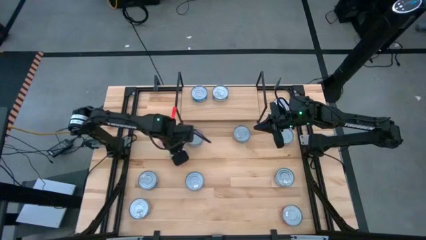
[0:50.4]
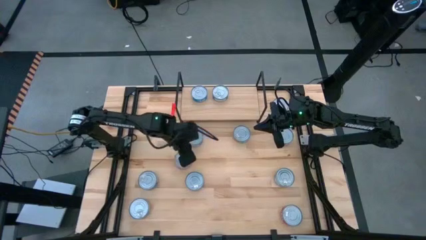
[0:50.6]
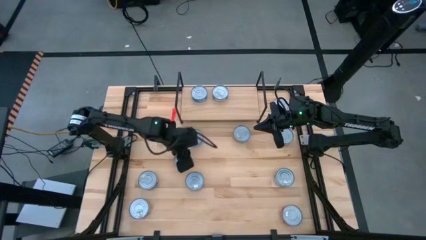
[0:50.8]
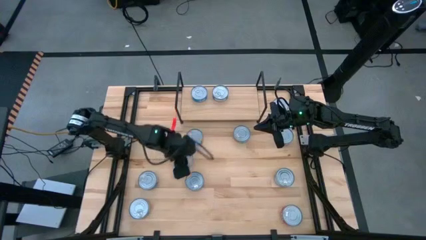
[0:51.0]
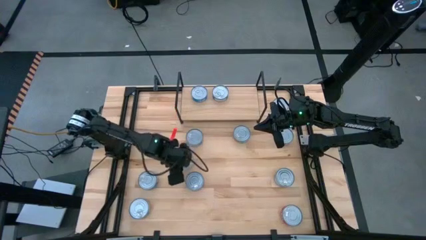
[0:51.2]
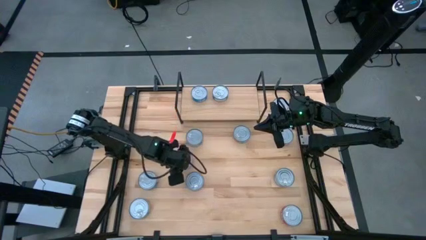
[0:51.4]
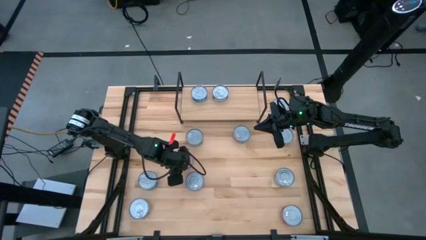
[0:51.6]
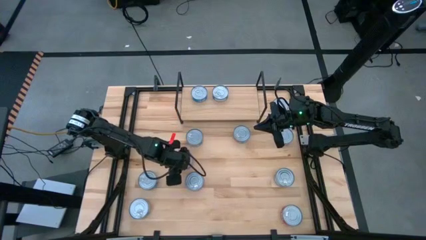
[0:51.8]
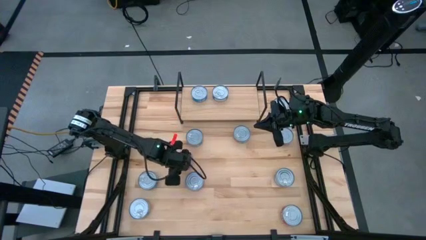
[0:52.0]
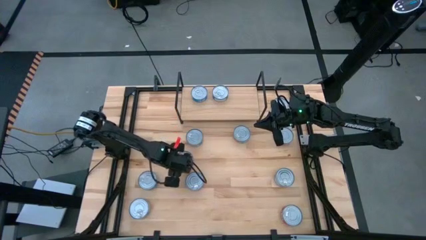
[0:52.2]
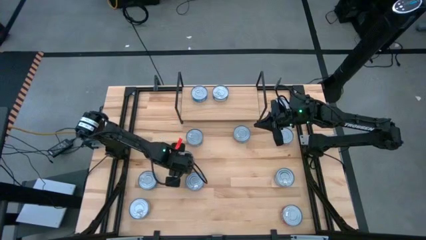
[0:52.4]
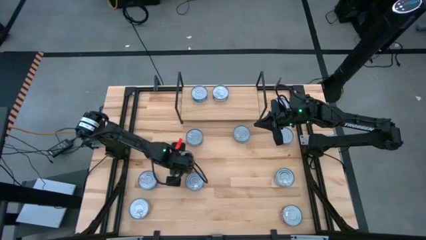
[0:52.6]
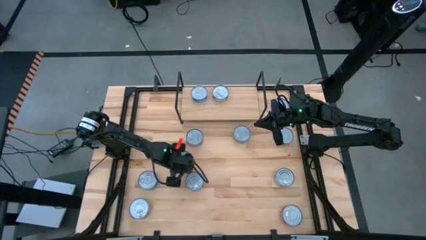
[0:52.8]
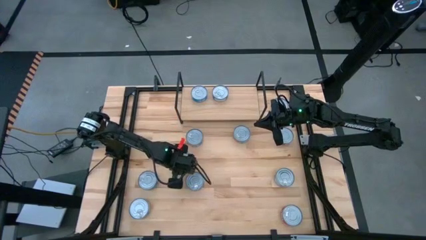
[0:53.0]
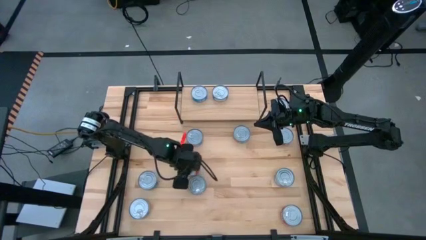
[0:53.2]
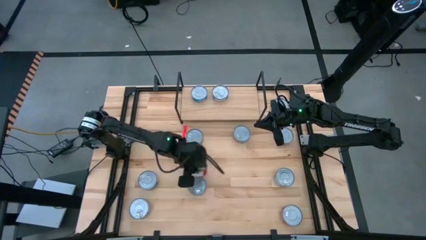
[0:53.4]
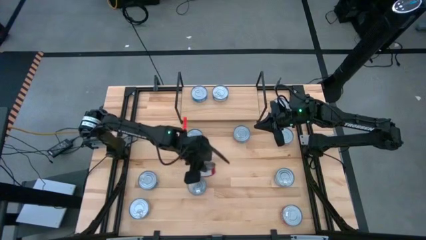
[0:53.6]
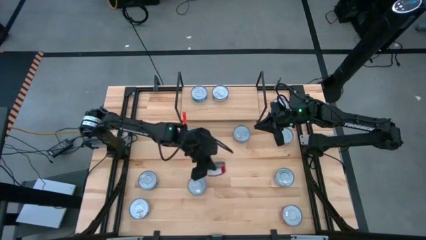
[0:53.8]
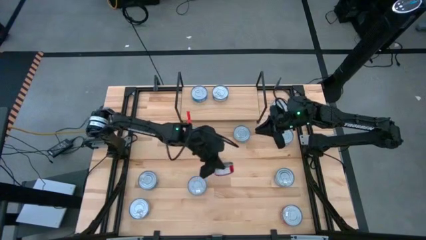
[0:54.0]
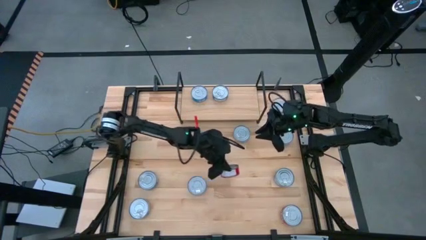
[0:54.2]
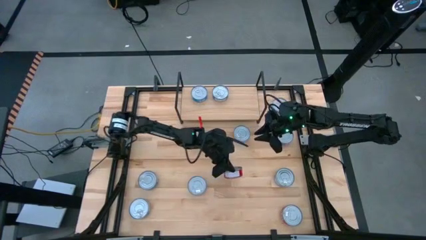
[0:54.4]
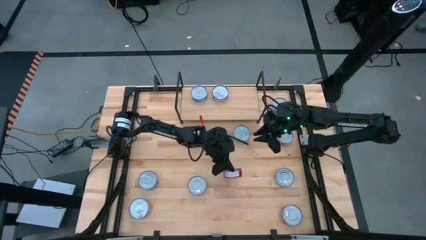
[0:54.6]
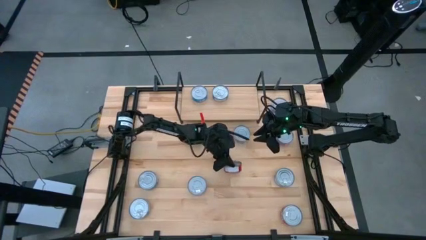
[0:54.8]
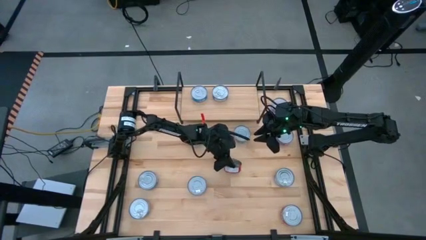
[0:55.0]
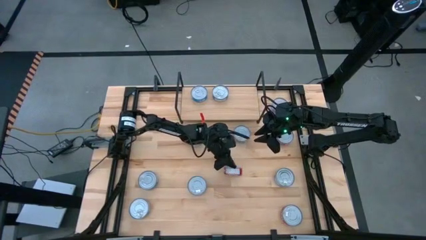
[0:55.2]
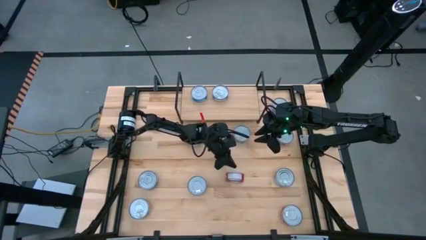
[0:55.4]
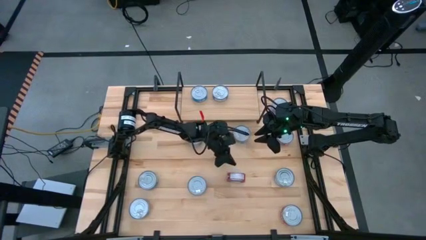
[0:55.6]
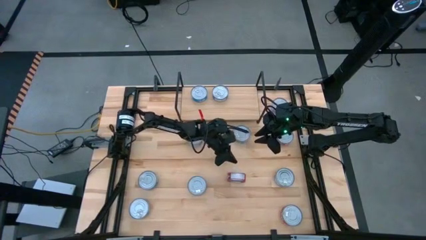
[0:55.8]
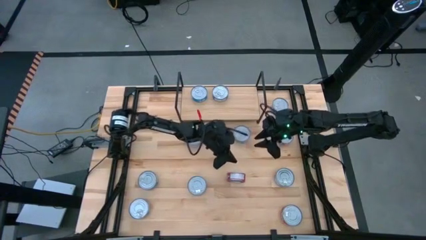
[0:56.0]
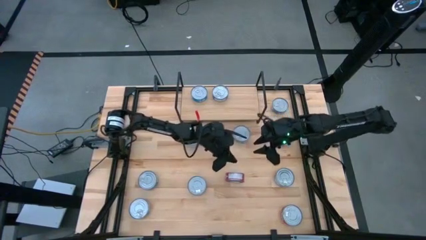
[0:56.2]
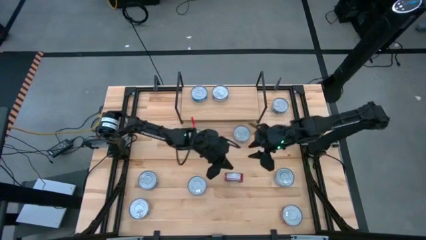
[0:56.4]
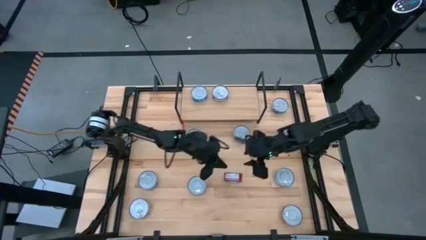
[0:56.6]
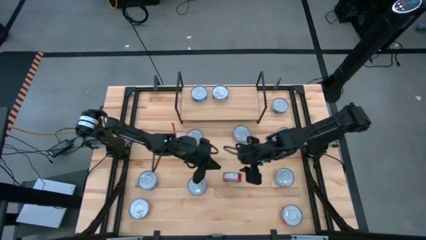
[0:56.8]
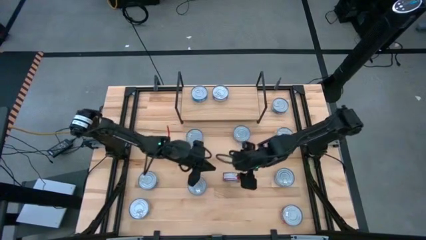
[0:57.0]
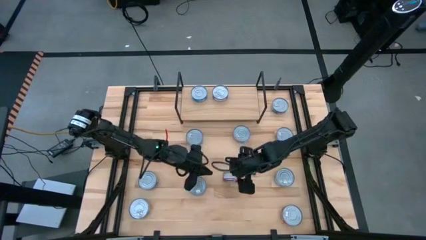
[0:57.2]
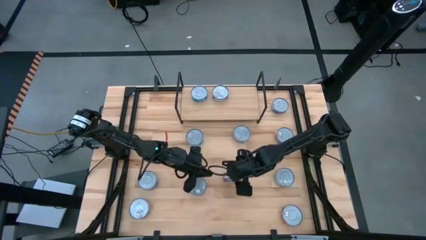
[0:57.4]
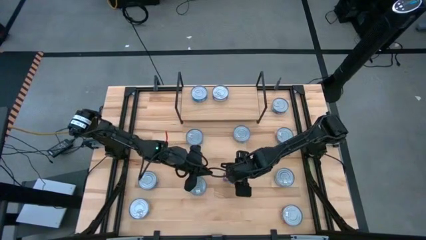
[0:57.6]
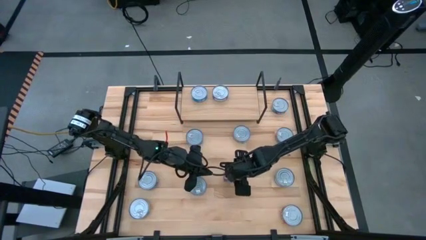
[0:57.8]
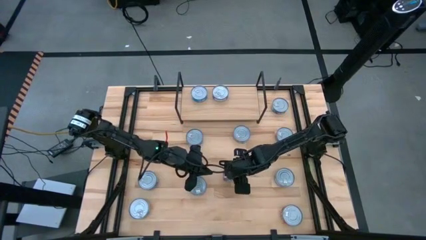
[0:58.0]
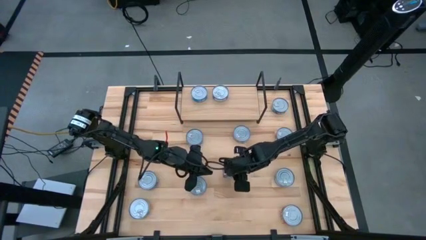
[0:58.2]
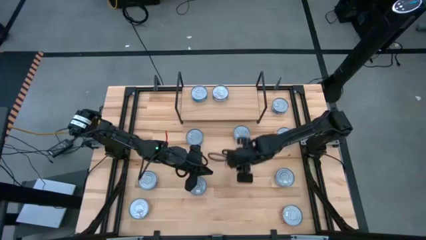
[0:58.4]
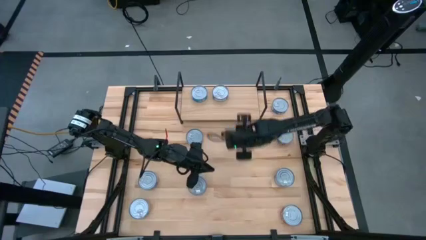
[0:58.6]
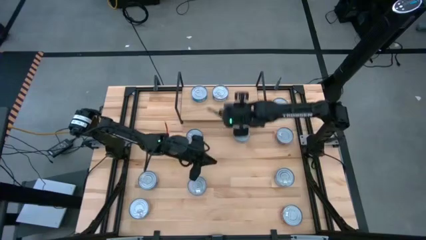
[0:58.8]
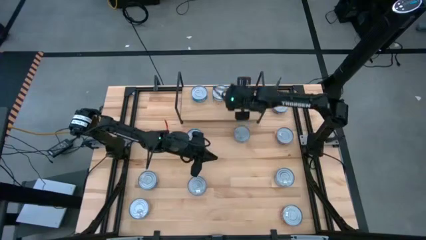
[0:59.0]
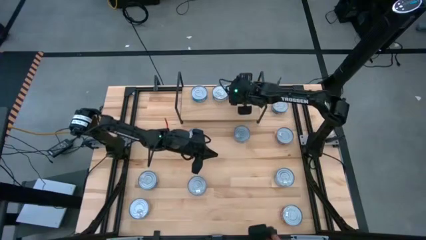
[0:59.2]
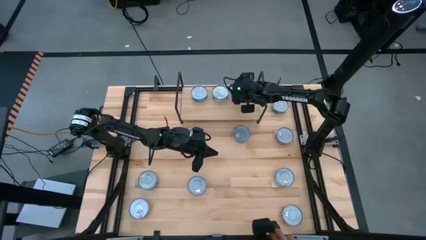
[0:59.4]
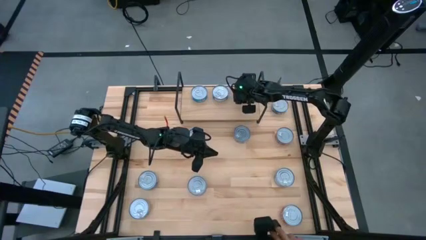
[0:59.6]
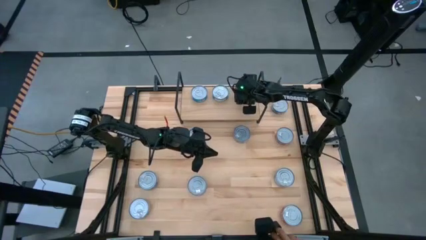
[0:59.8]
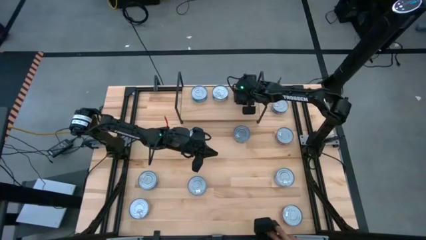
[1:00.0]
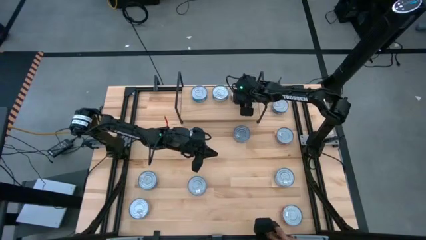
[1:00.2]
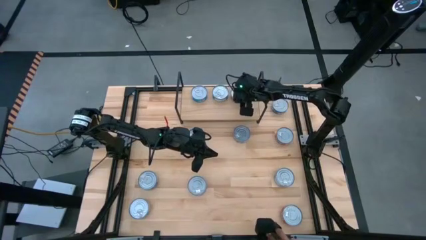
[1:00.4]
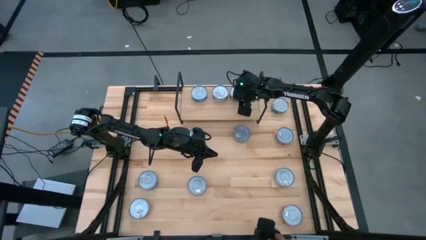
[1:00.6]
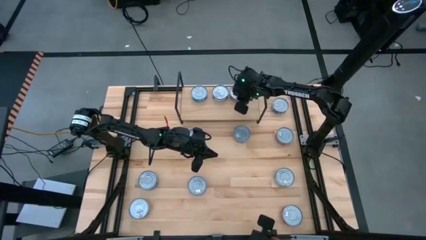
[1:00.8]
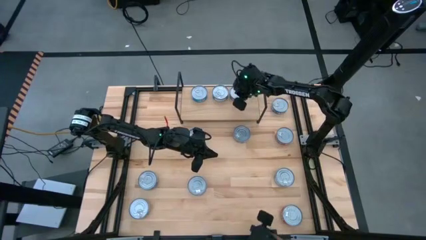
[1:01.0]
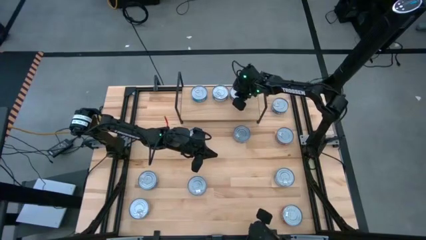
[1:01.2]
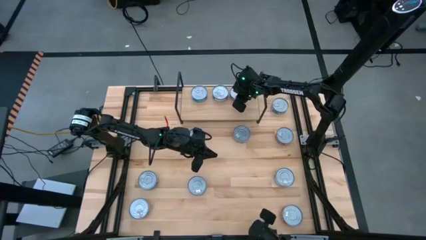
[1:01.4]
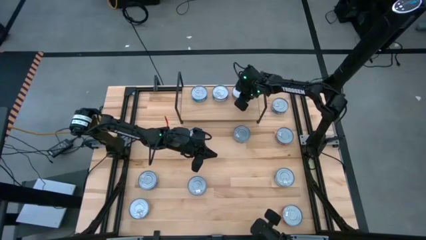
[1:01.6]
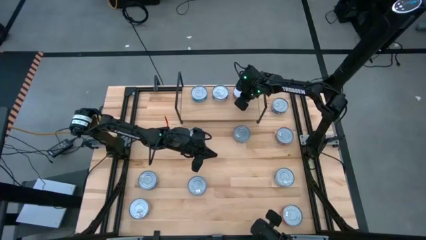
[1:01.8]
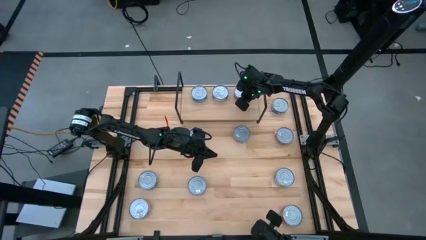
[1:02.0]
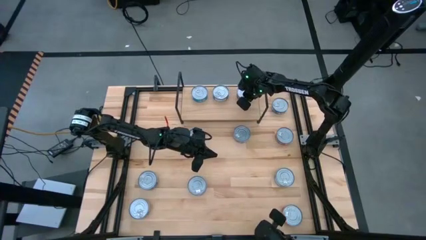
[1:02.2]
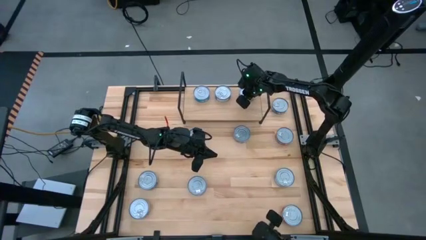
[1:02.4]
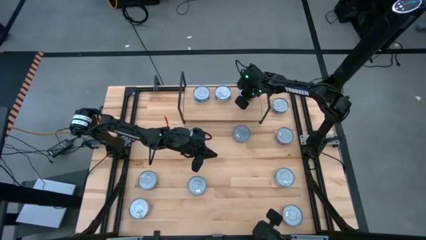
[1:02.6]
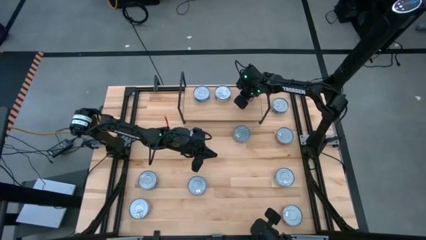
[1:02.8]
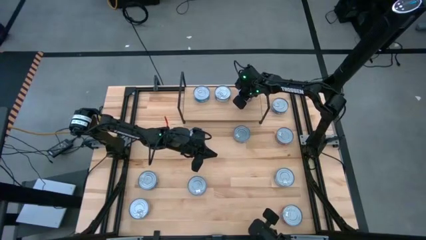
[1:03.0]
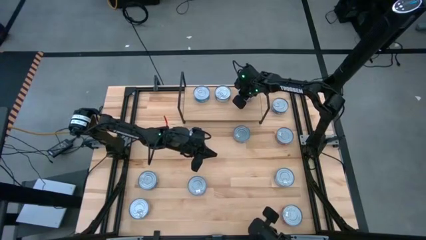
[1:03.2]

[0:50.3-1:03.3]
Task: Stack canned seafood by type on shelf
Put the red tuna can on the shelf

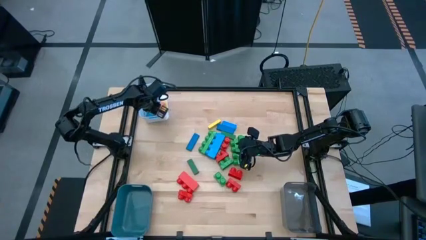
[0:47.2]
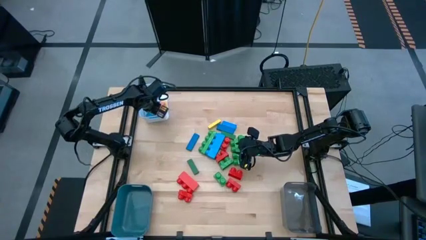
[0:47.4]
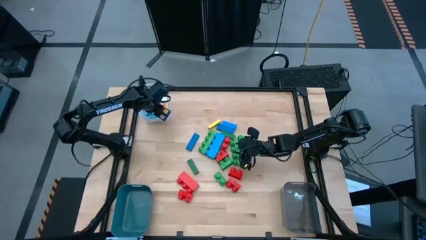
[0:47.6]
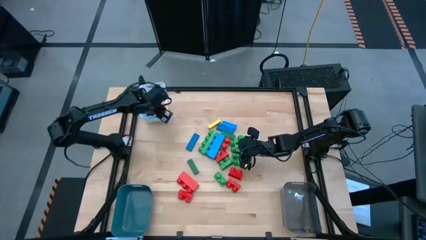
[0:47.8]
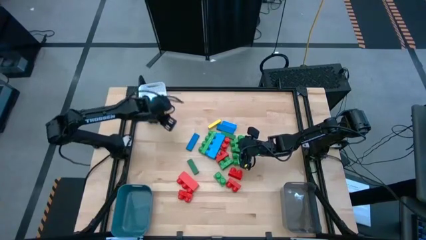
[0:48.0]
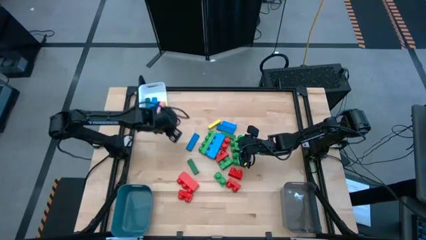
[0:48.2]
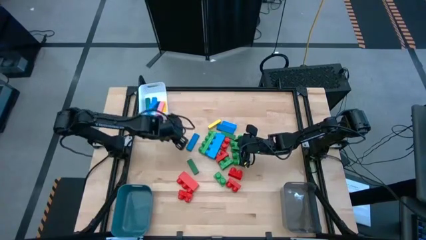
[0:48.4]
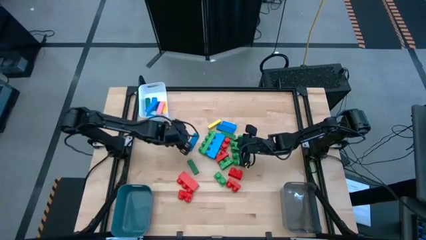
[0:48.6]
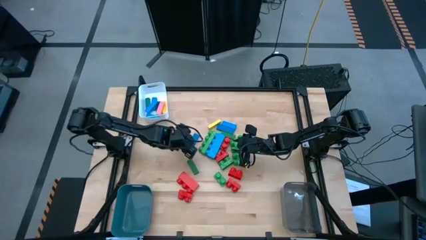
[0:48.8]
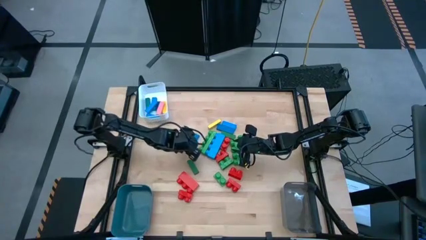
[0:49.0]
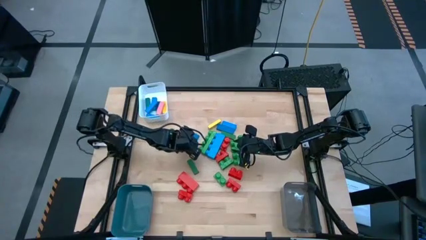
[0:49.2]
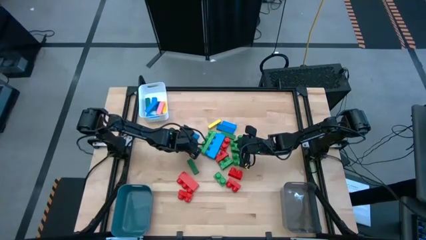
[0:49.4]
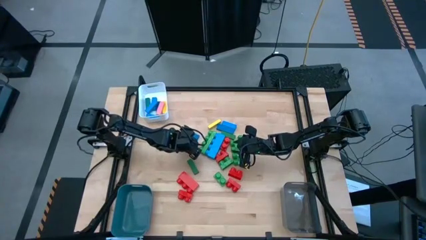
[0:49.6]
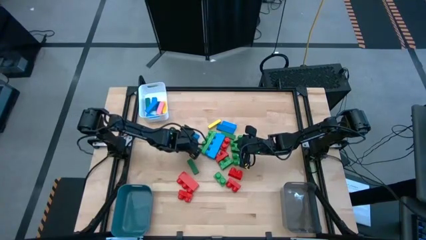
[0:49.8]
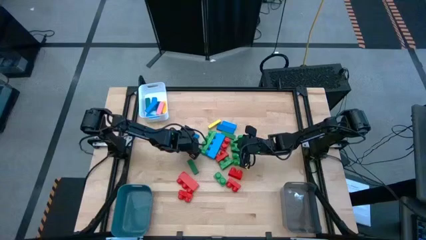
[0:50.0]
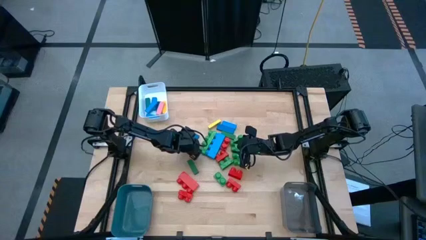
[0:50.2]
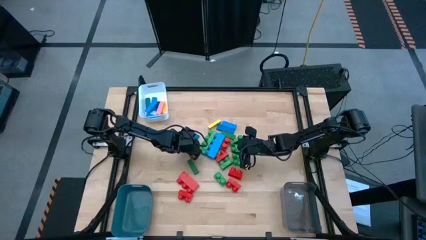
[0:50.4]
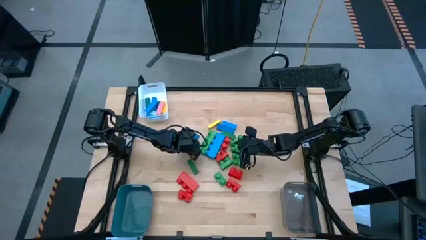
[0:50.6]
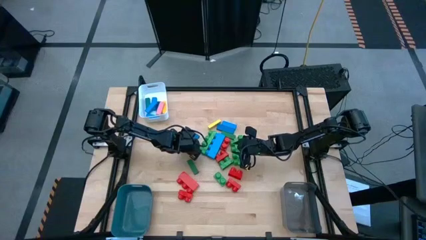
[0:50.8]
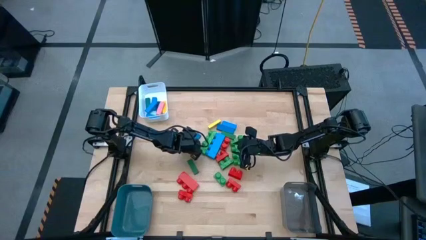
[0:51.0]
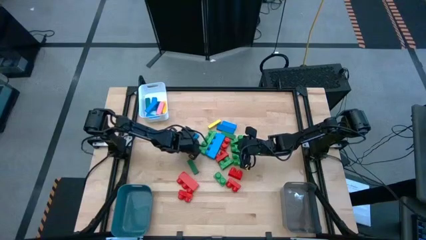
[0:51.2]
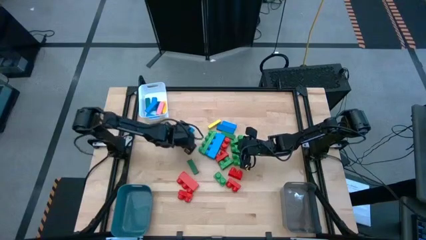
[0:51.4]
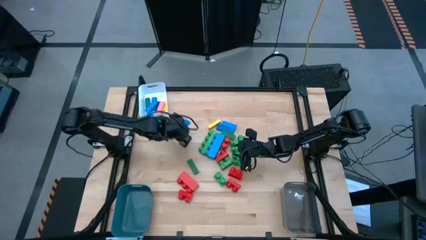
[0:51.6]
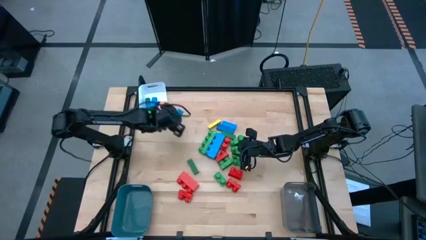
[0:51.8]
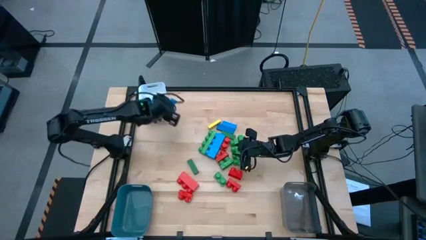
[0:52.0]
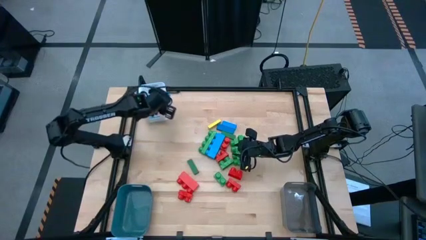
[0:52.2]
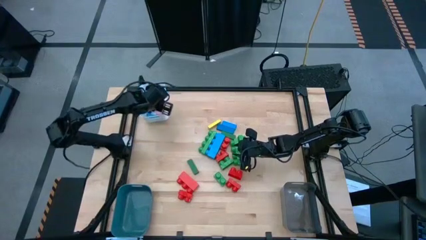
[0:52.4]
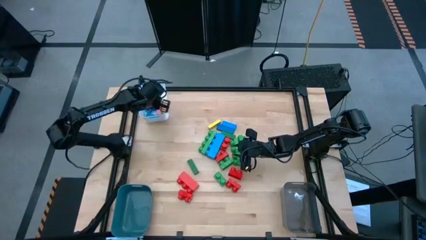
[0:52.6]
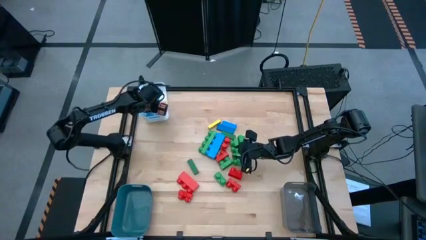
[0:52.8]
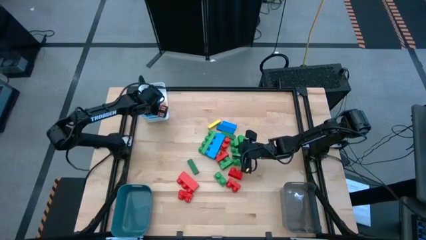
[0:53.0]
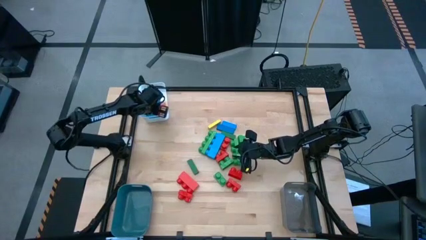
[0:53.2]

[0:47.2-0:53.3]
Task: Sort blocks by size
Put the dark blue block into the white bin
